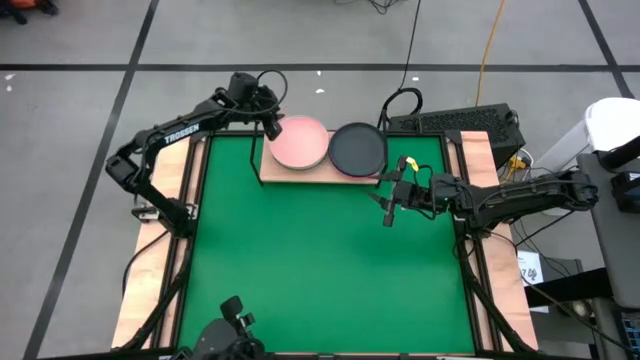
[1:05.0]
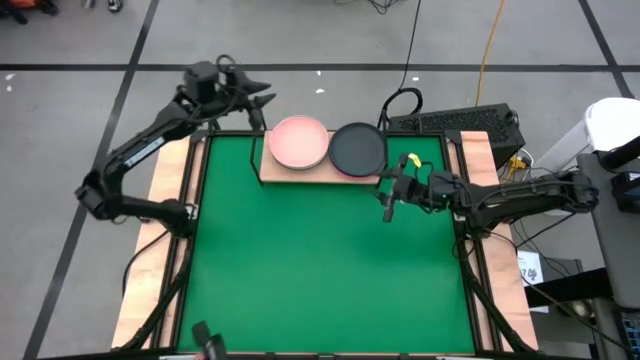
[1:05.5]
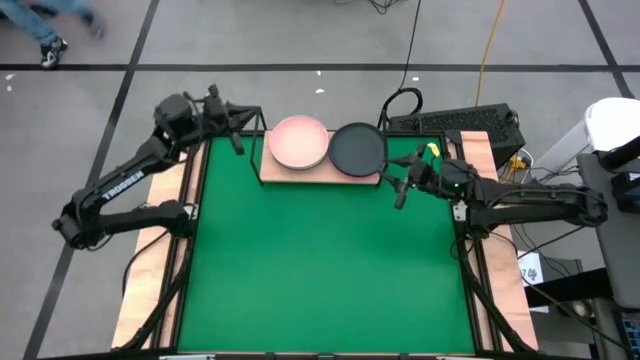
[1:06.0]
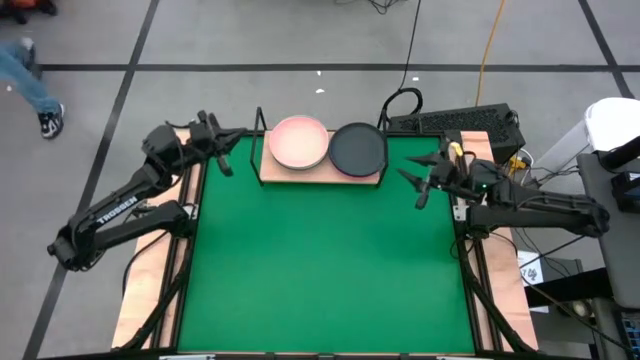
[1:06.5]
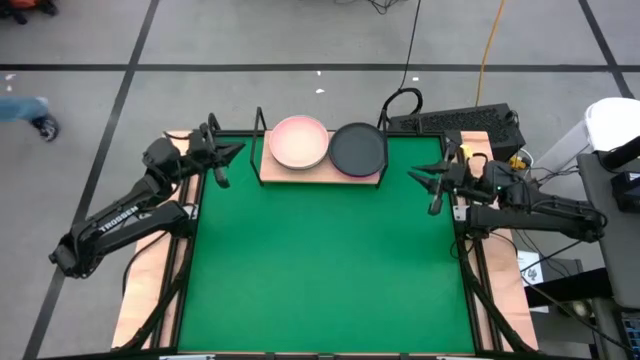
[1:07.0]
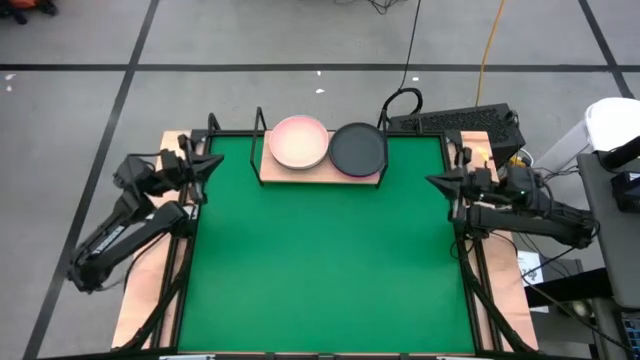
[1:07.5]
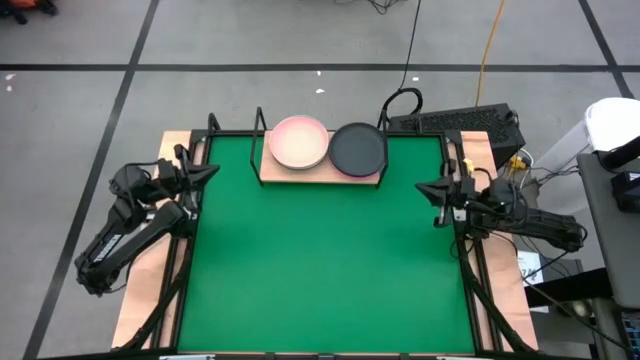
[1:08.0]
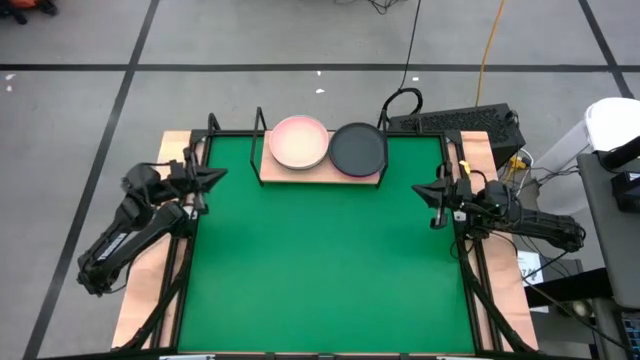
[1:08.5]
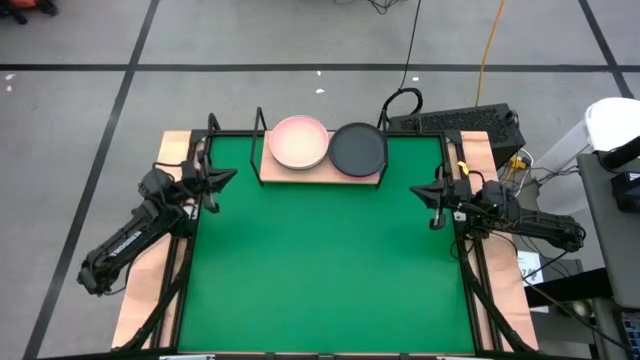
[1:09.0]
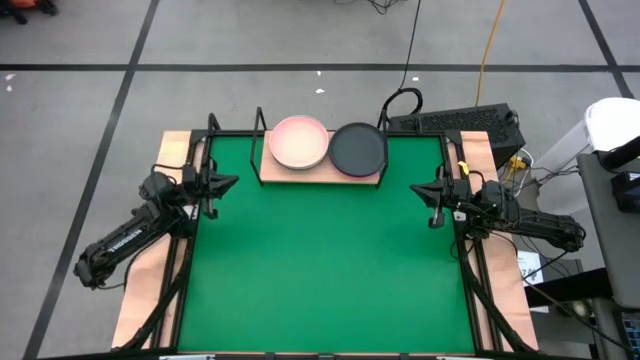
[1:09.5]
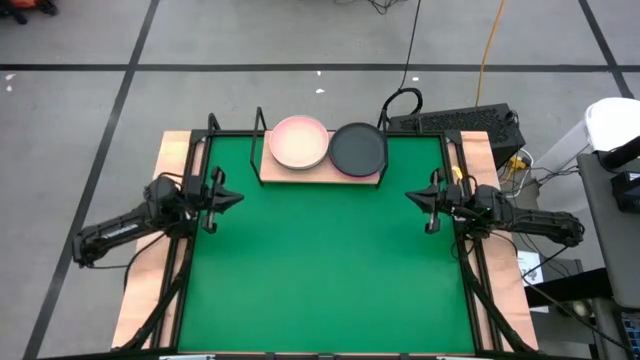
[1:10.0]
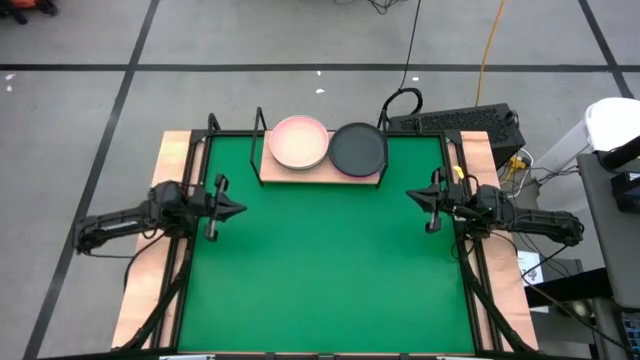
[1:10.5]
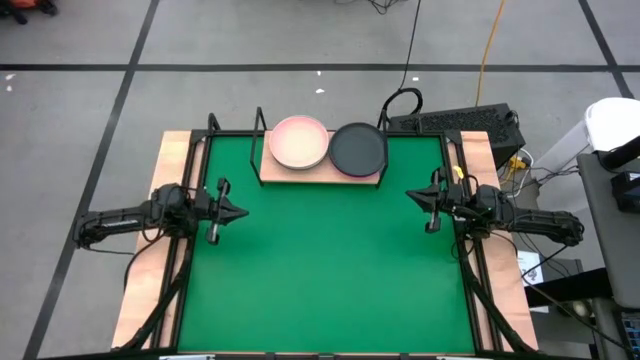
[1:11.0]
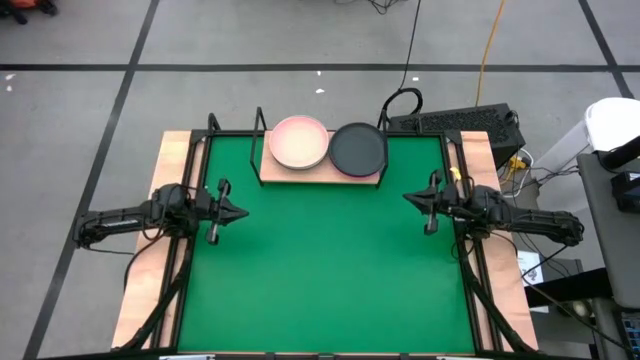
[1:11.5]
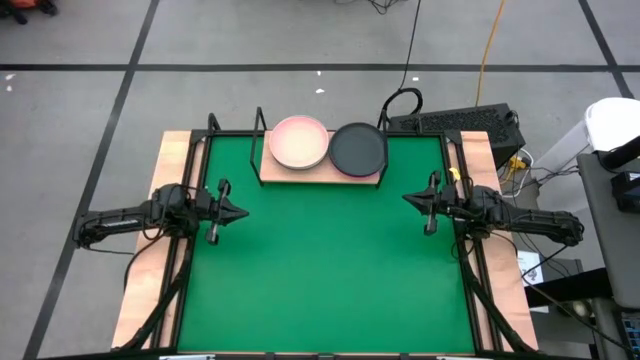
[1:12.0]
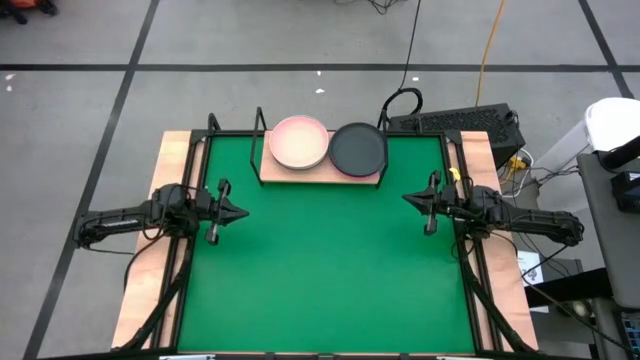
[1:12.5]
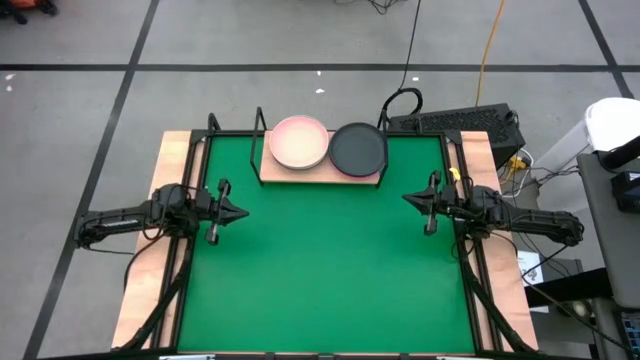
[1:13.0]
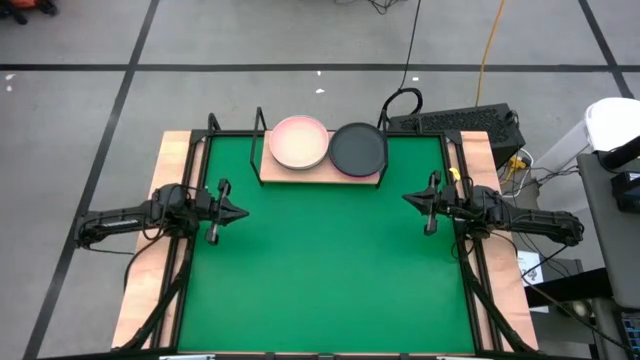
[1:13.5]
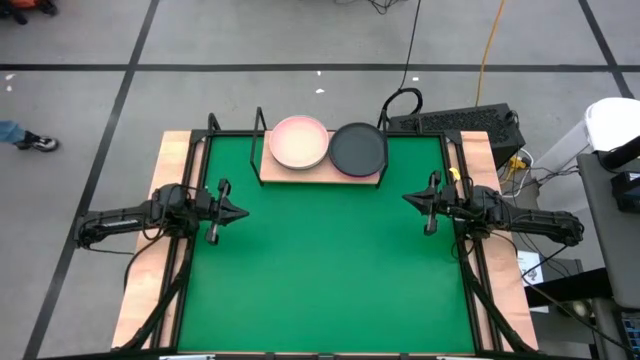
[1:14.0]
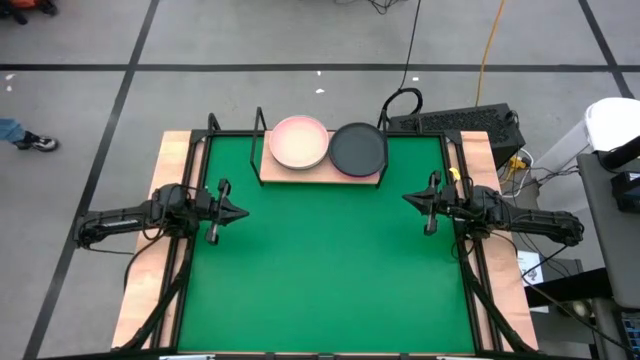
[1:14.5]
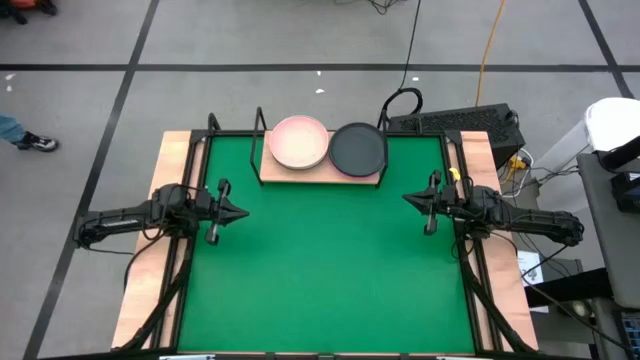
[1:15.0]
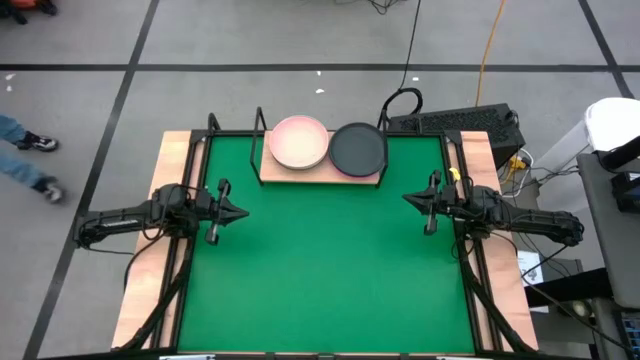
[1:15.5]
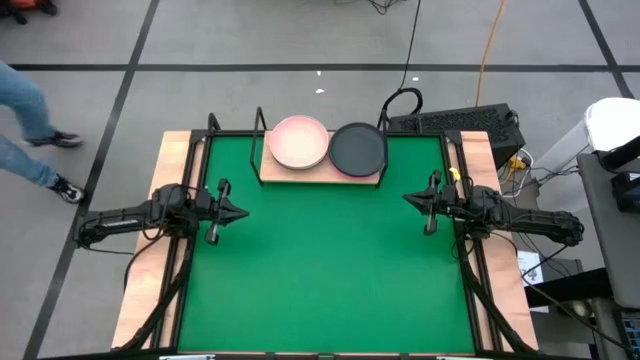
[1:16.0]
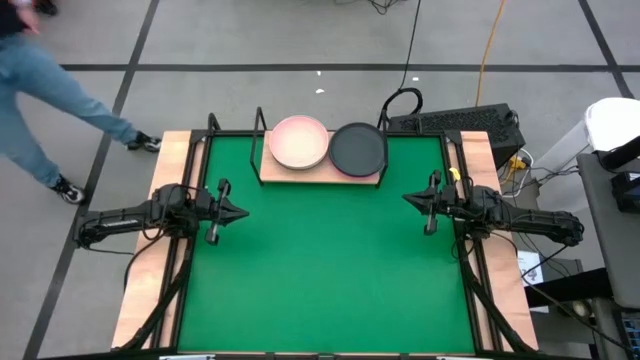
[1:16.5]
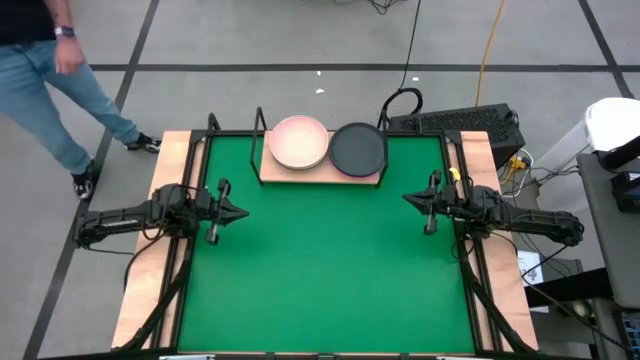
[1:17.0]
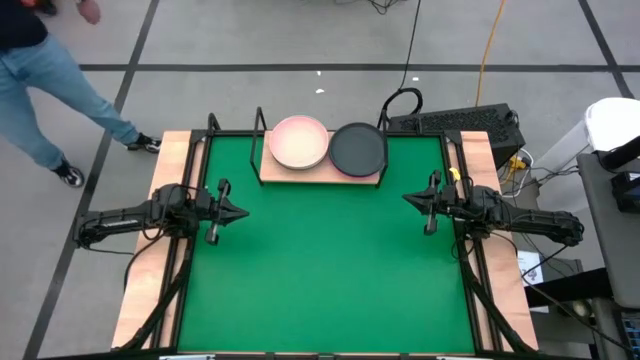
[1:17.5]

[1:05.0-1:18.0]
Task: Place and stack plates onto a shelf
Return to Home Position

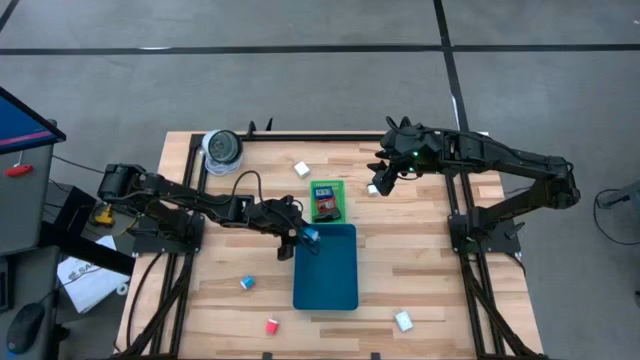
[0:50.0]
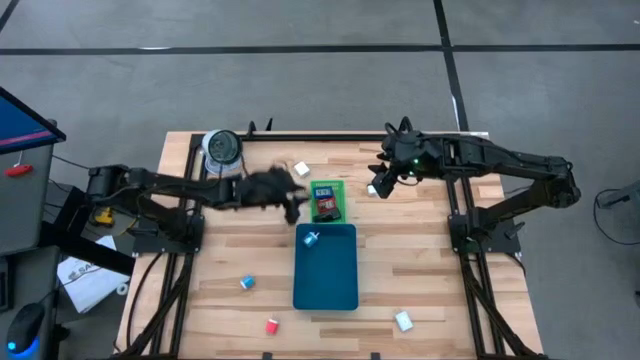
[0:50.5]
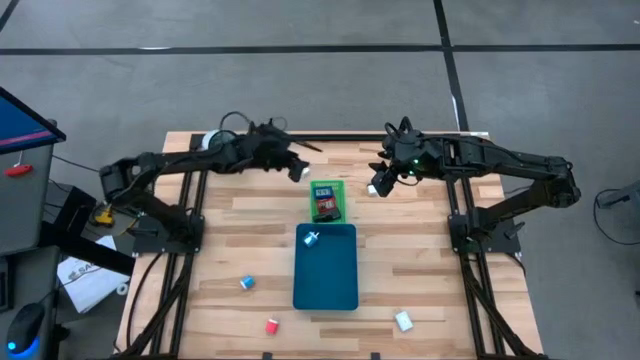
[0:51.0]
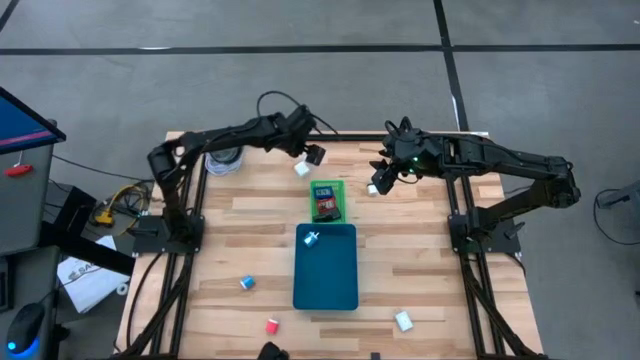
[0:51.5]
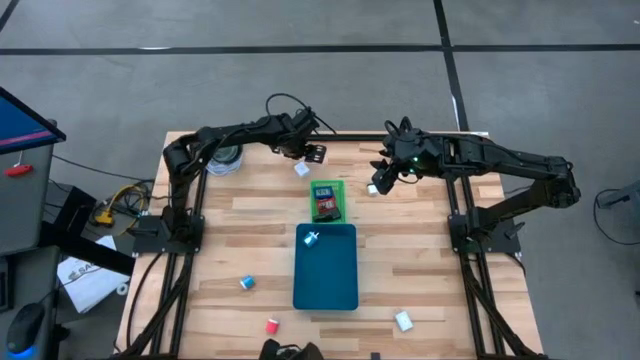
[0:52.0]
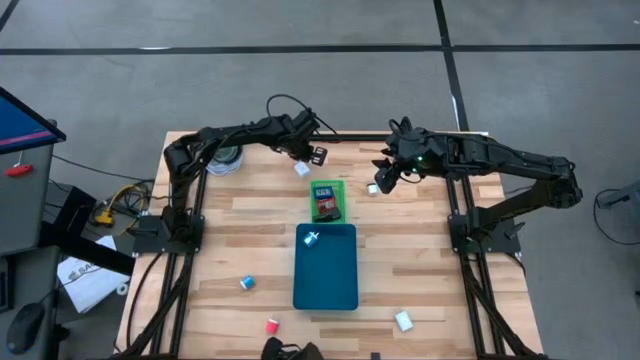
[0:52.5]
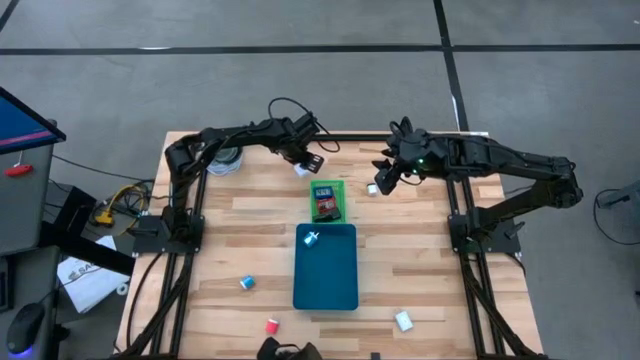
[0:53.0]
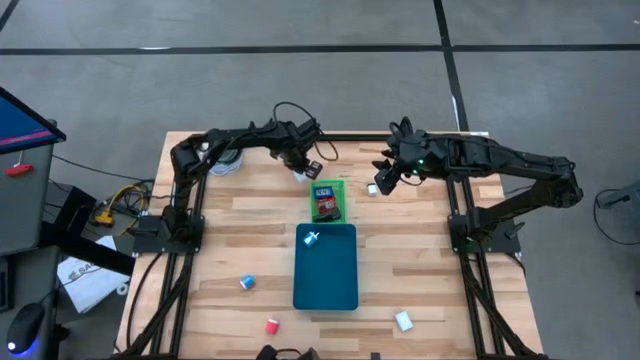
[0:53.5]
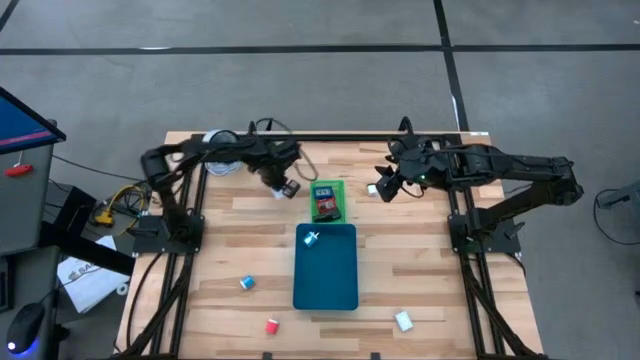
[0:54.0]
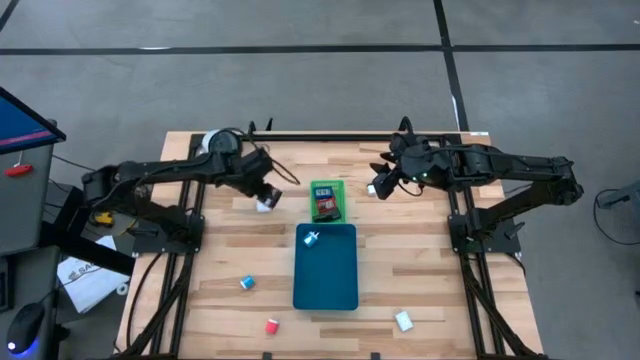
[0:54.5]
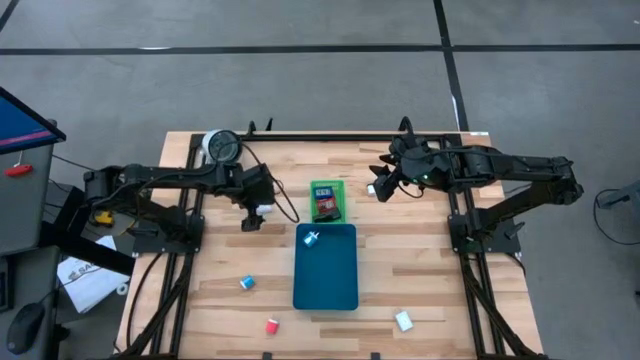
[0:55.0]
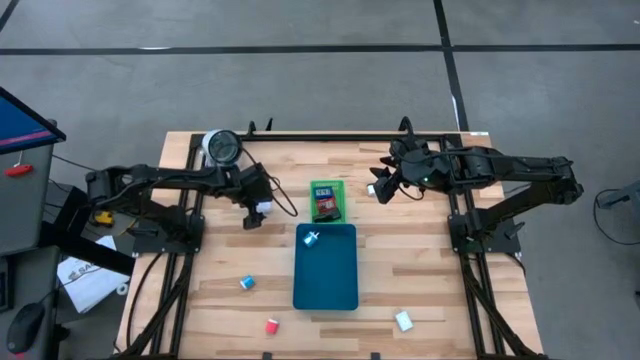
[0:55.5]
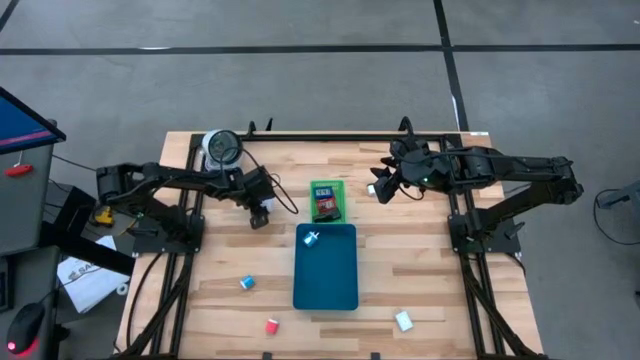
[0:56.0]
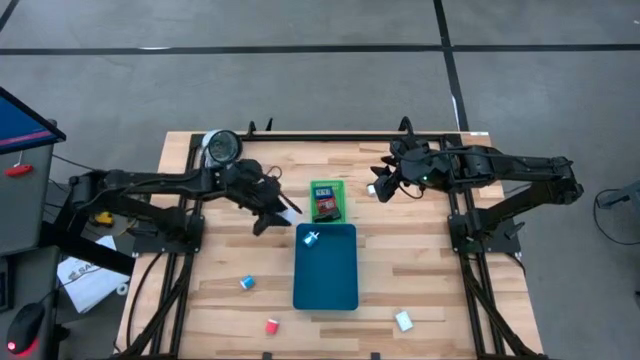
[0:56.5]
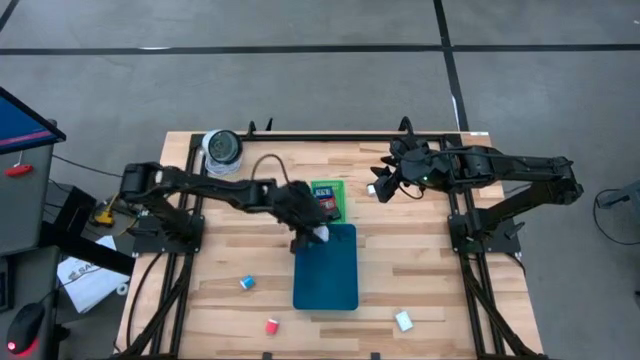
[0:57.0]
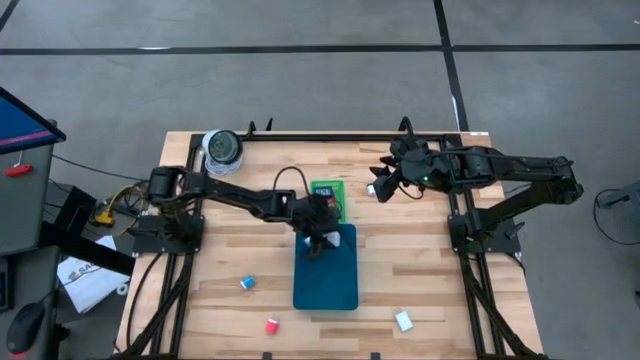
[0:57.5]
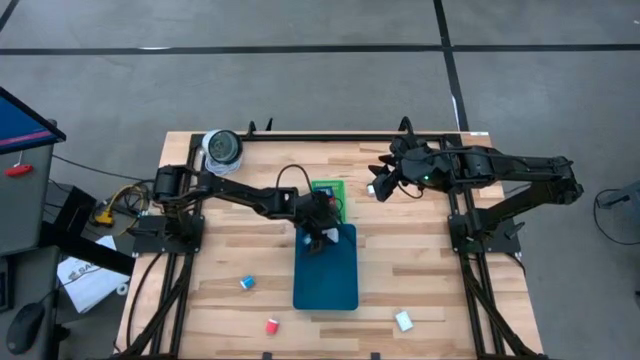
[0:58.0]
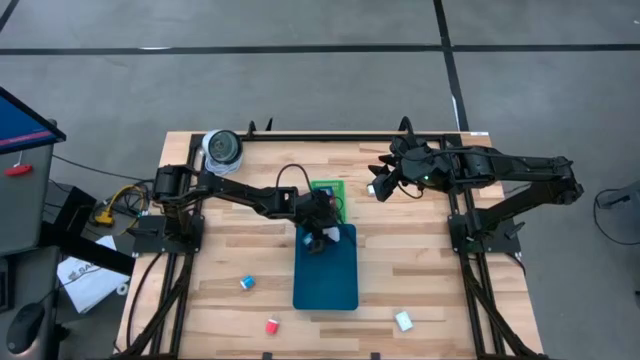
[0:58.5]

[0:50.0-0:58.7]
Task: Pick & Place Office items
Put the top white charger adapter into the blue bin
